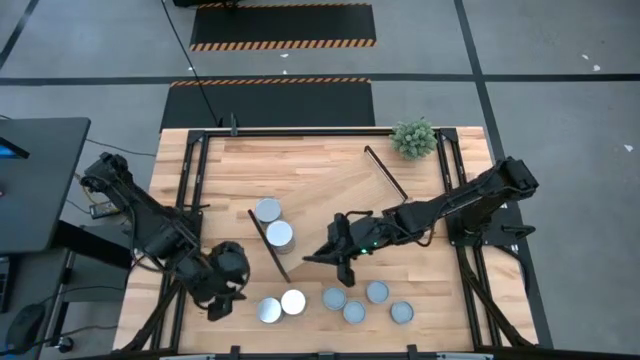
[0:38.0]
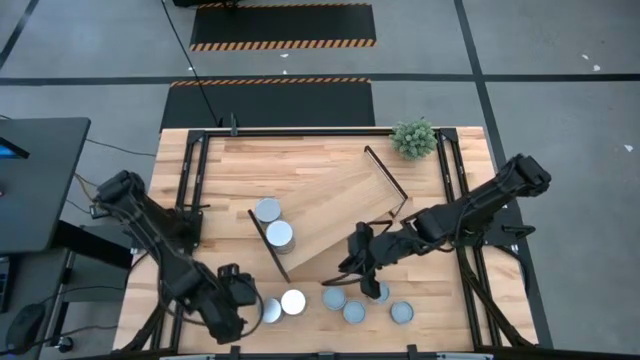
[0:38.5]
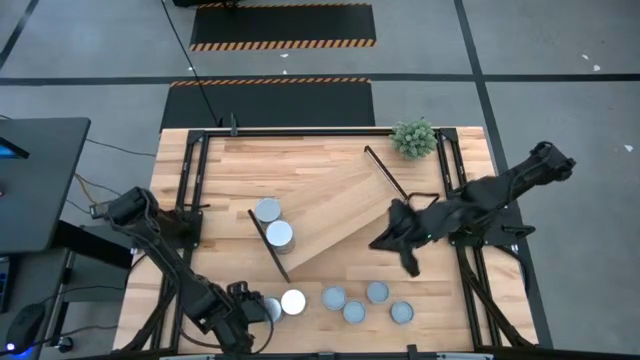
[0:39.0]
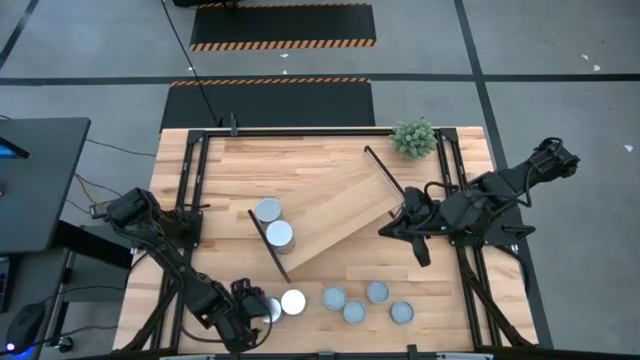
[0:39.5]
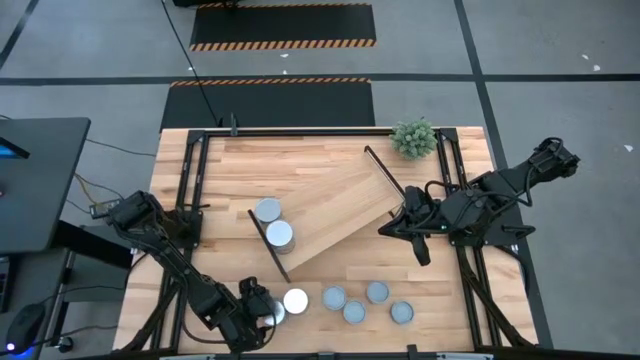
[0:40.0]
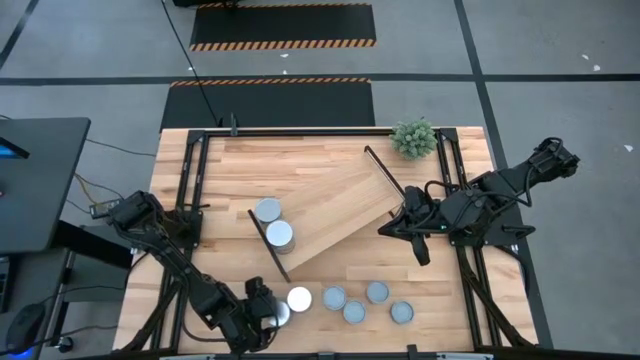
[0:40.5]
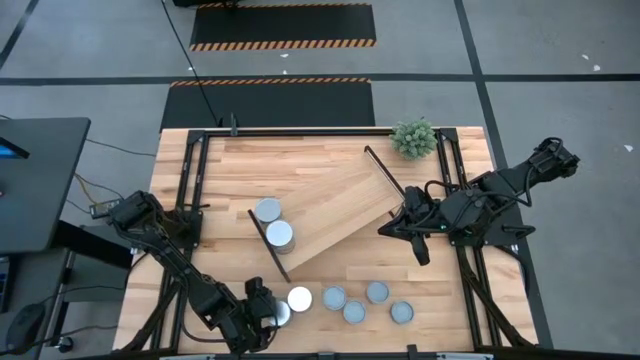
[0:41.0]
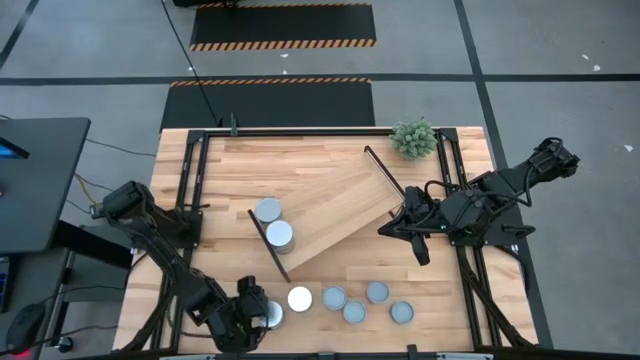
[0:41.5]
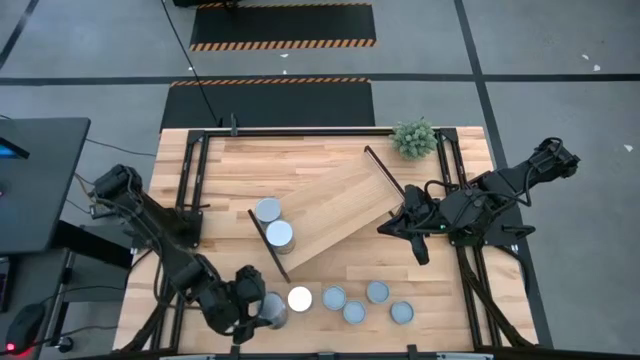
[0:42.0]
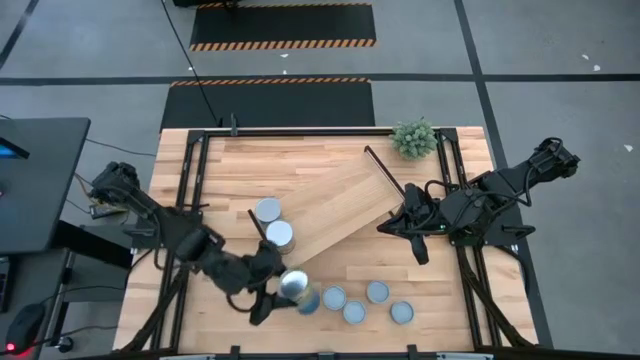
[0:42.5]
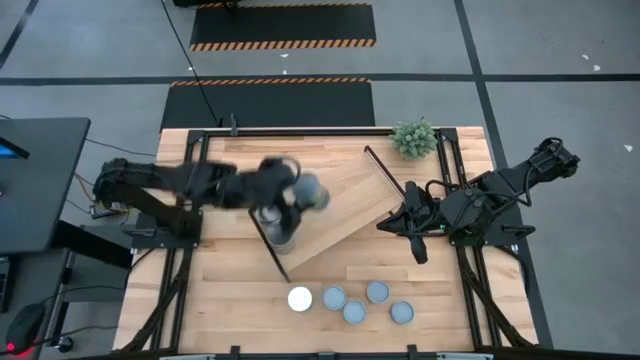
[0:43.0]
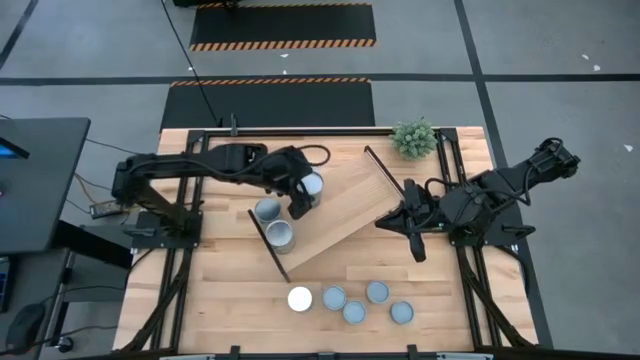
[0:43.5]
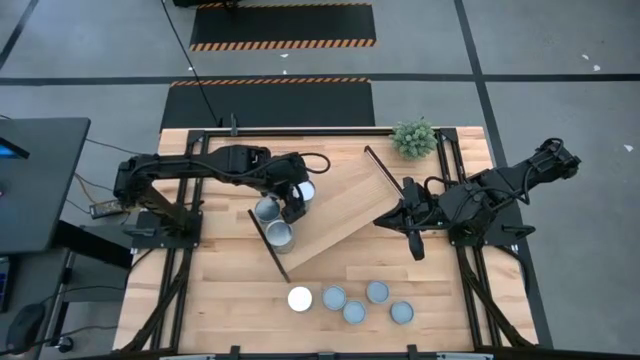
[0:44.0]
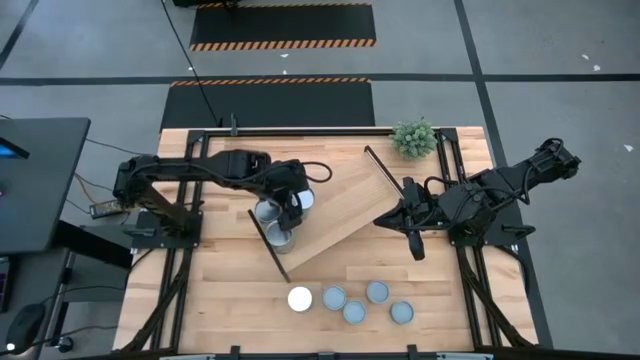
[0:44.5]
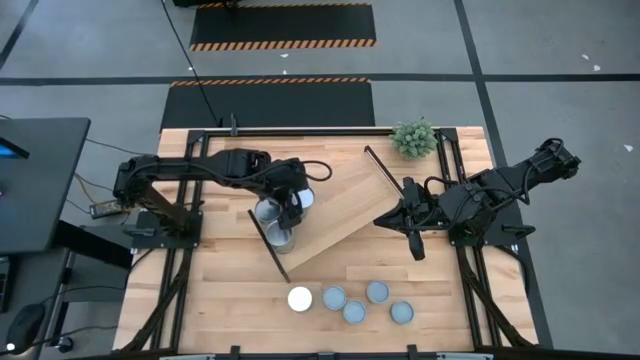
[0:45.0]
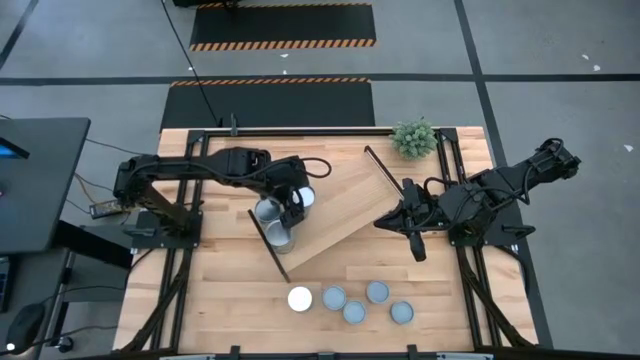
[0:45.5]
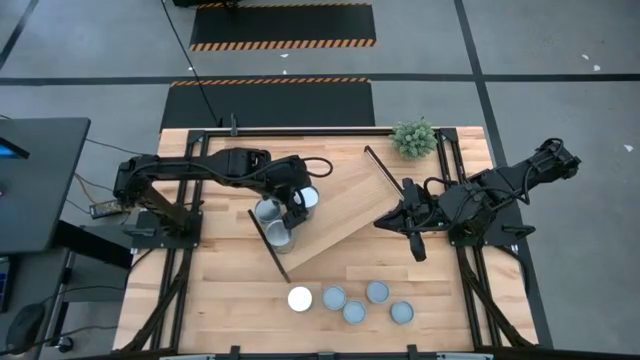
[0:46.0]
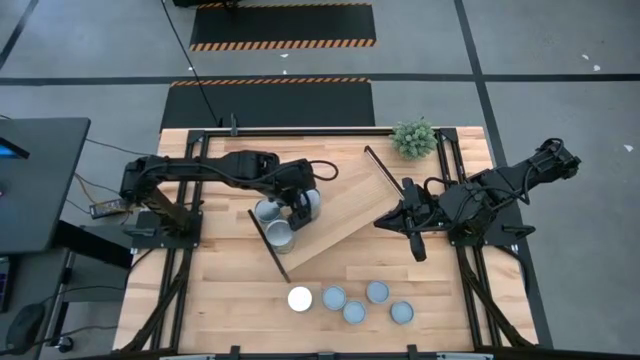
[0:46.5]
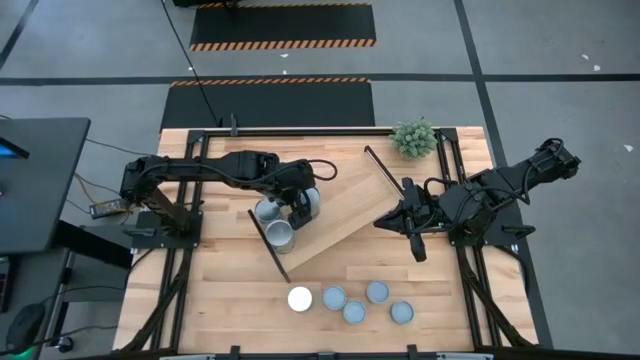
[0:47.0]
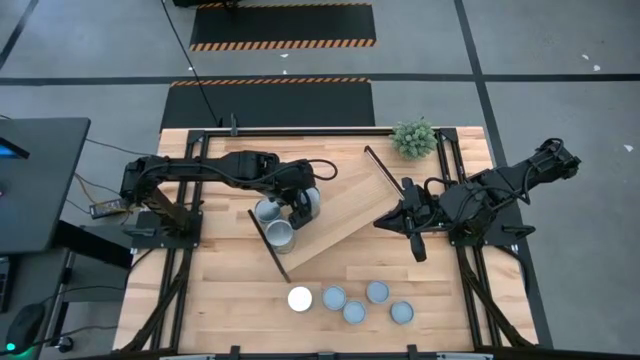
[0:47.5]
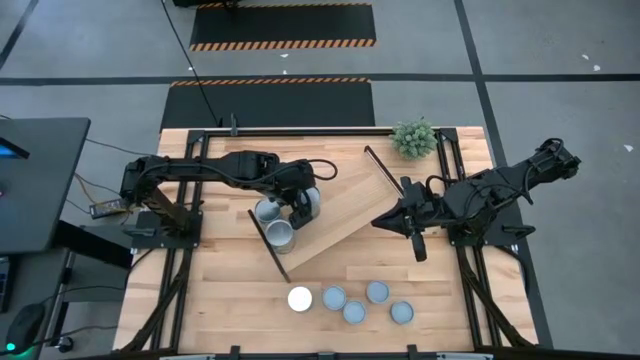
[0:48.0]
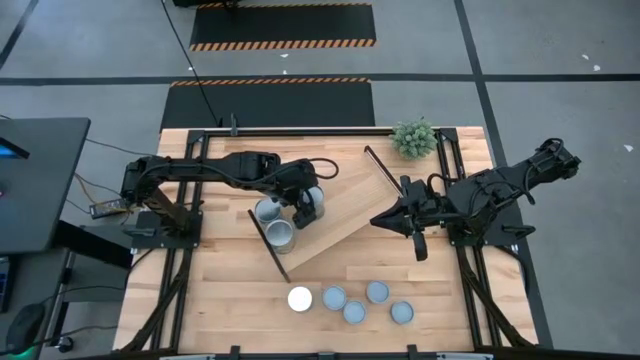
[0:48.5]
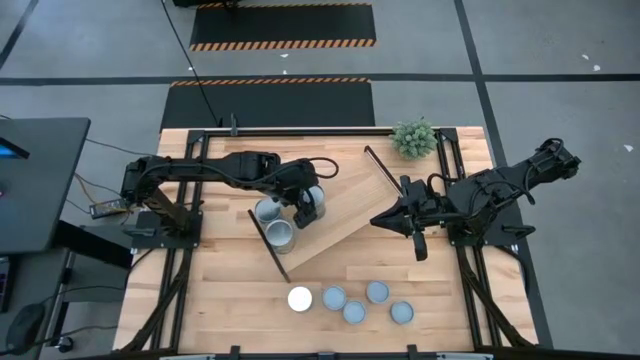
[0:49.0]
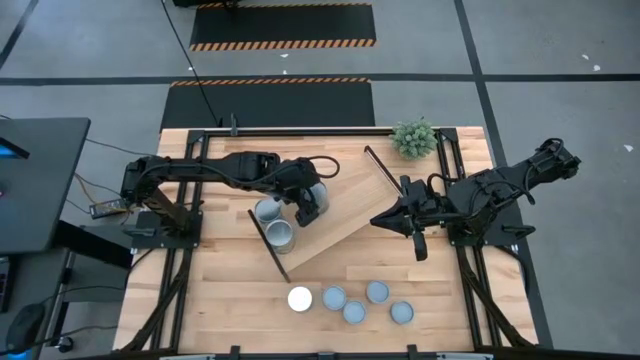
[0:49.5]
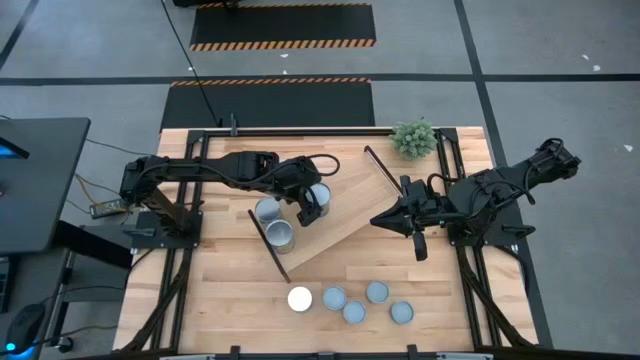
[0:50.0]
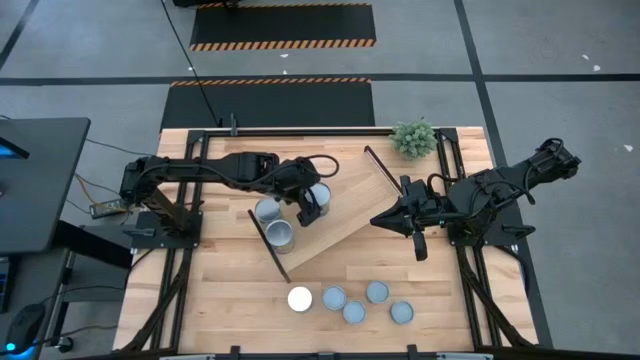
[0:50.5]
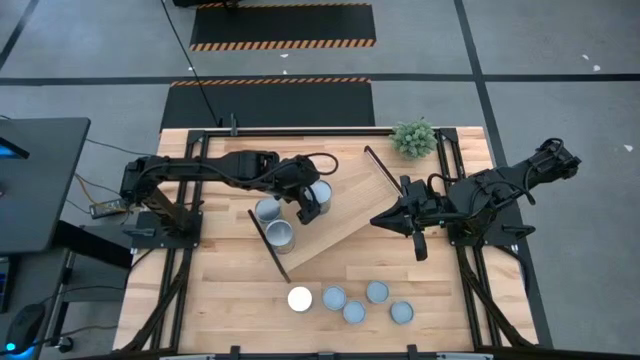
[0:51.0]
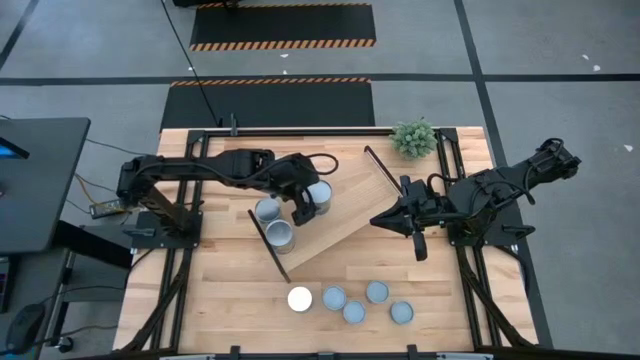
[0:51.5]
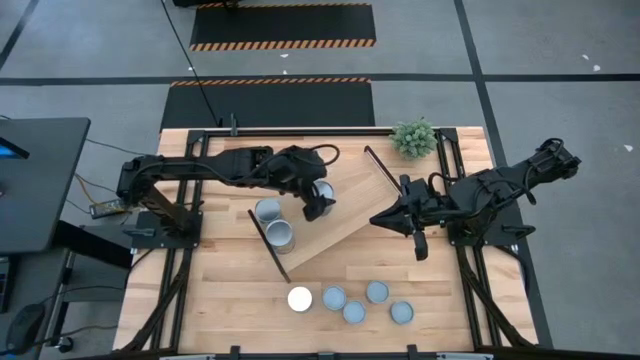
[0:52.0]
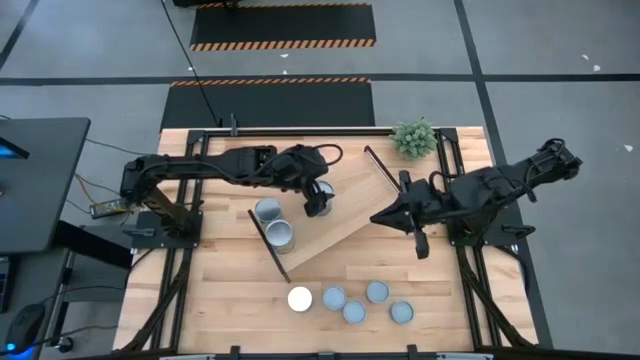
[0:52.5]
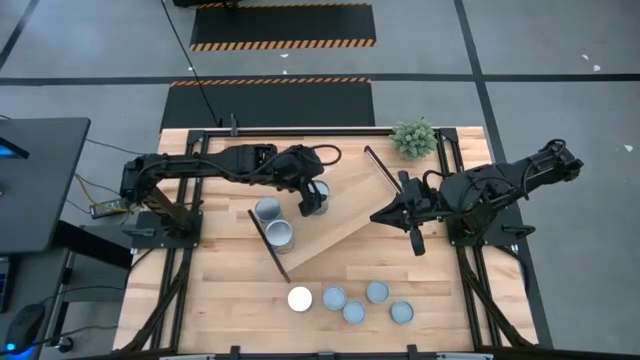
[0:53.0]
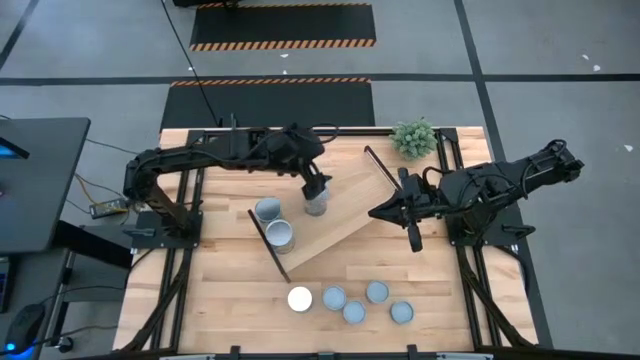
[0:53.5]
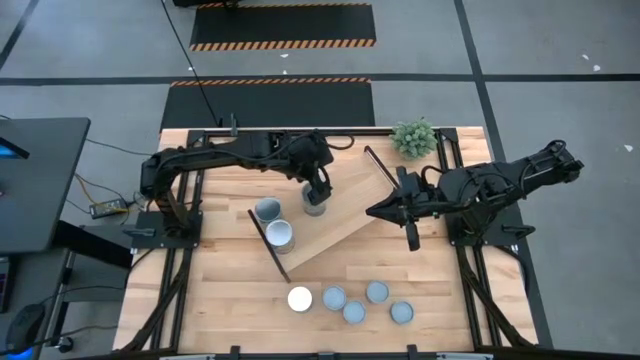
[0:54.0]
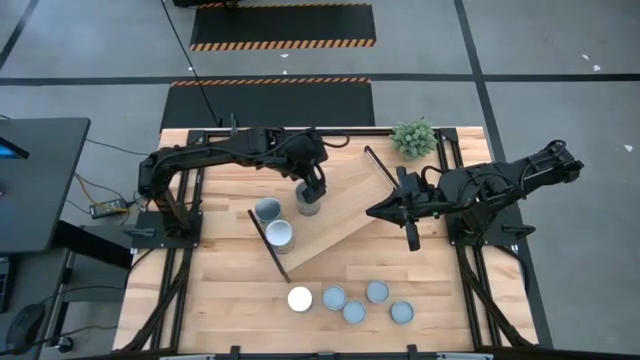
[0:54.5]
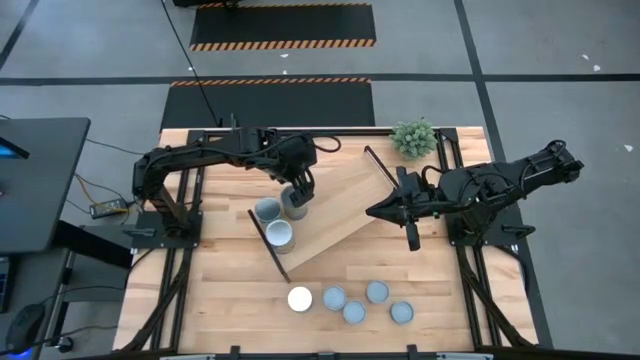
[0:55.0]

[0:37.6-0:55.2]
Task: Pick and place cans onto a shelf
Put the canned peas on the shelf

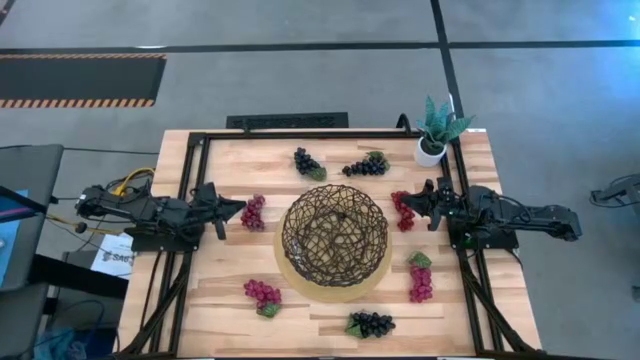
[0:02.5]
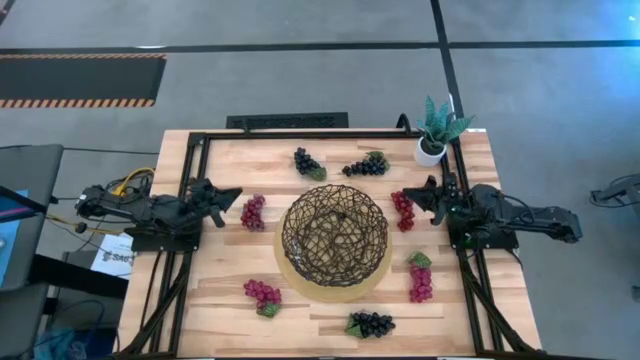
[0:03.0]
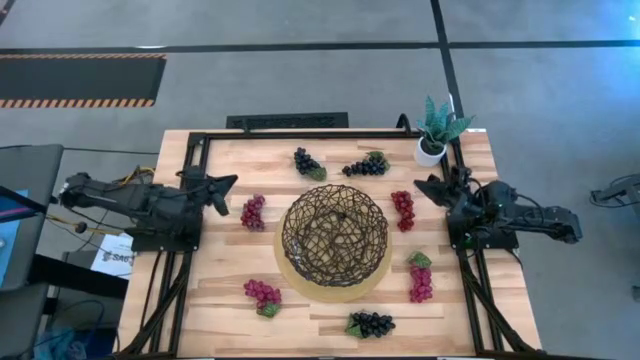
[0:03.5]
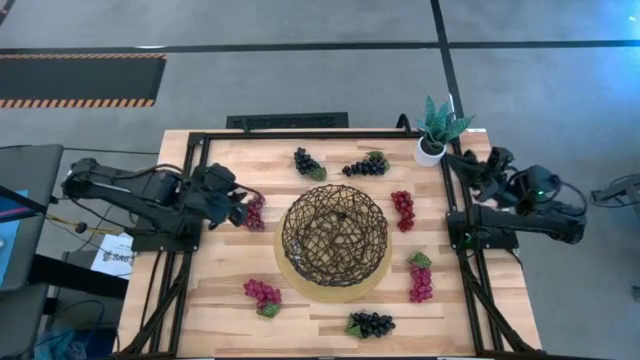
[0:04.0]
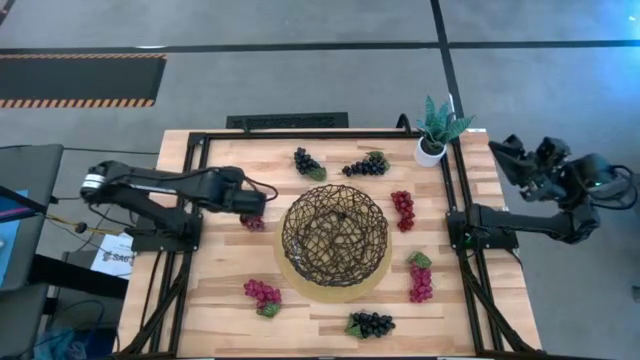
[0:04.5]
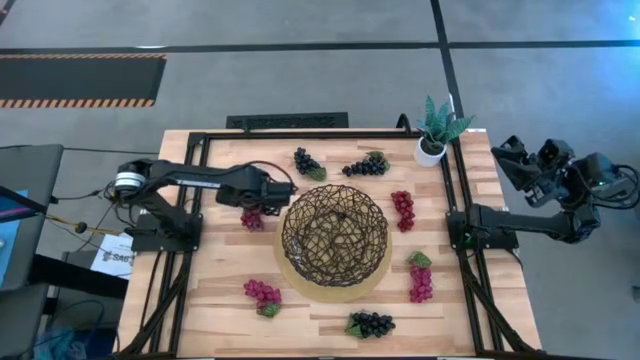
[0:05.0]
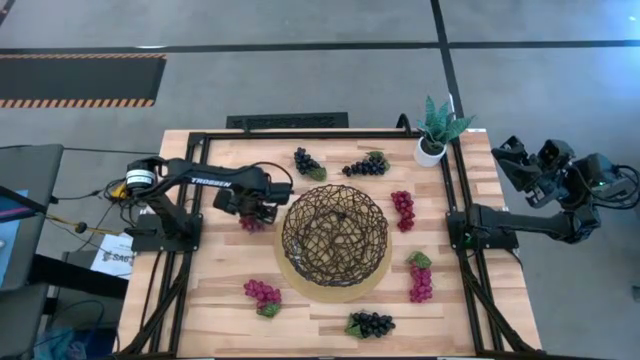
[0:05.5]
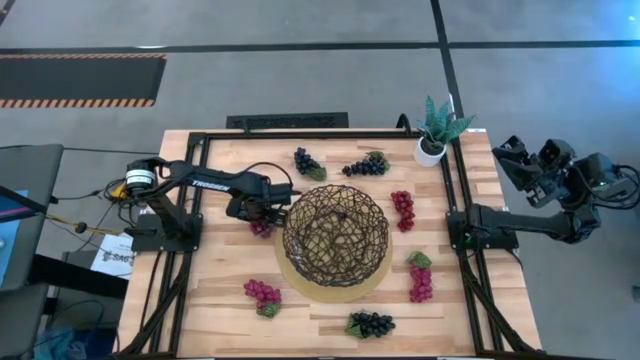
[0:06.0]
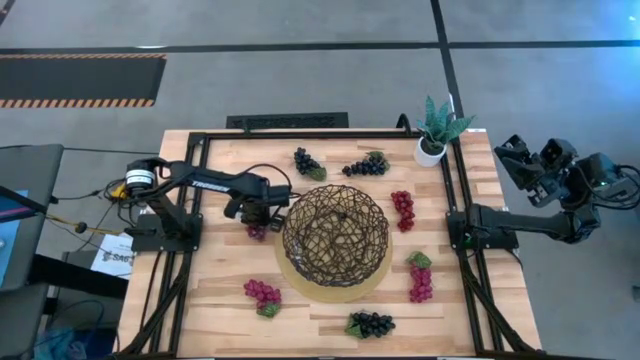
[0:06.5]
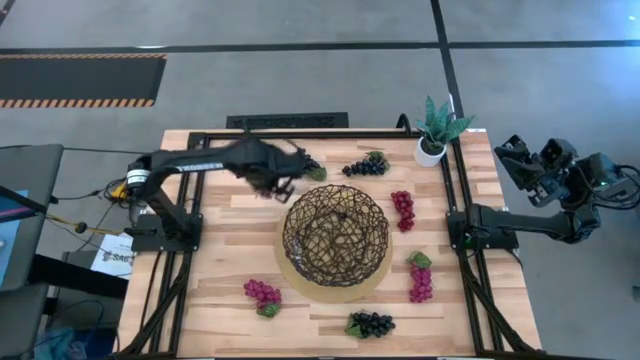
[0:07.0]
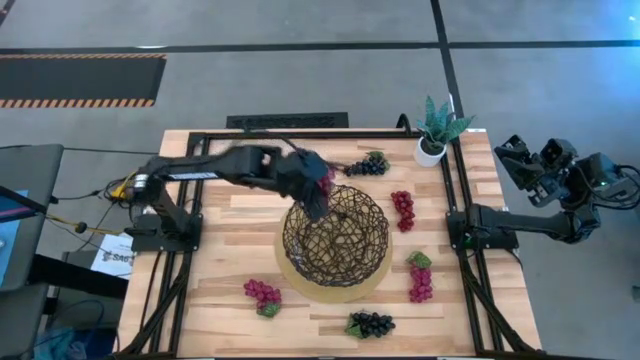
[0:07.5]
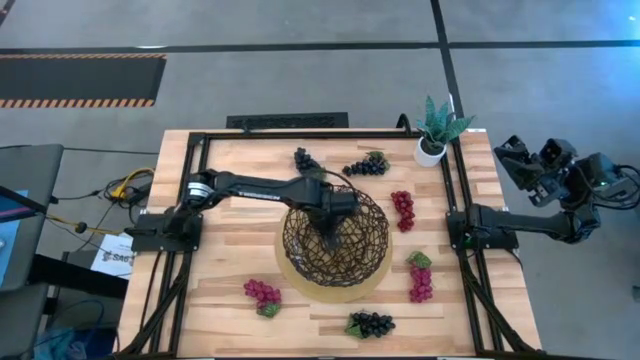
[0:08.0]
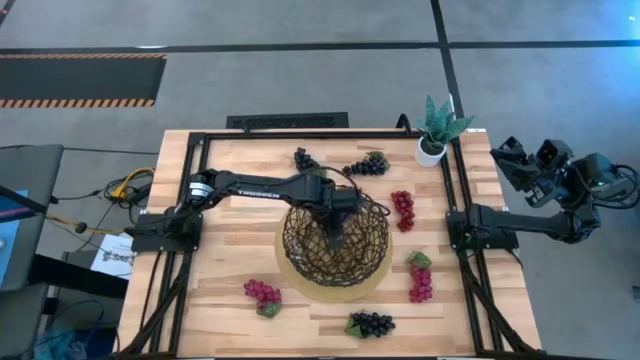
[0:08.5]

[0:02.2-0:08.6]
Task: Build produce basket
Put the left red grapes into the black wire basket
